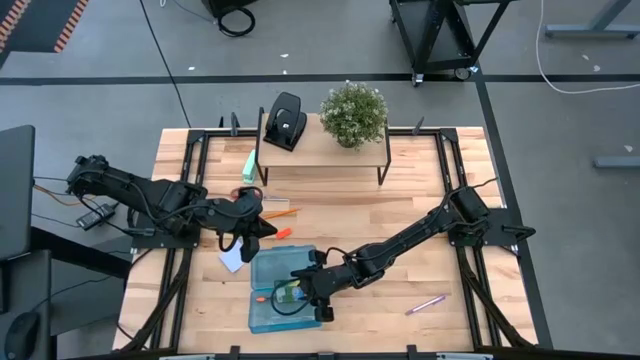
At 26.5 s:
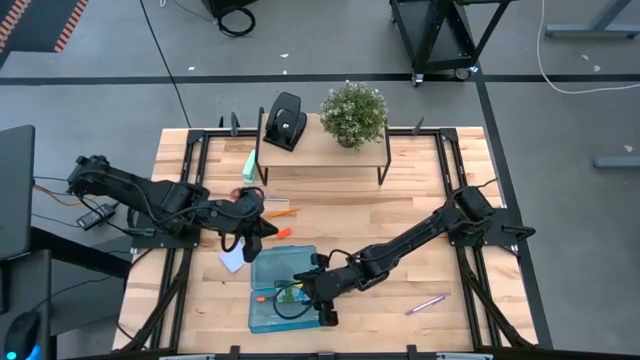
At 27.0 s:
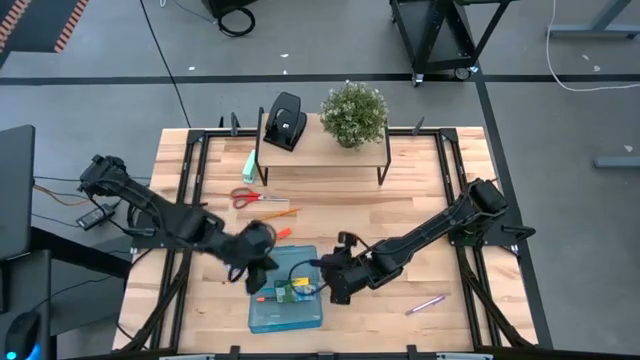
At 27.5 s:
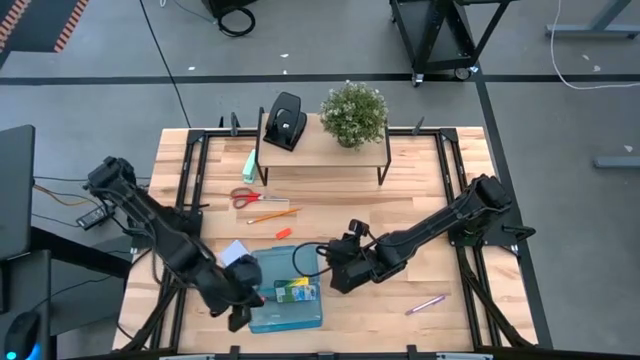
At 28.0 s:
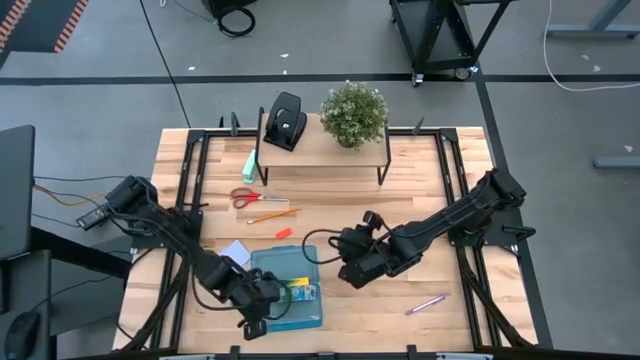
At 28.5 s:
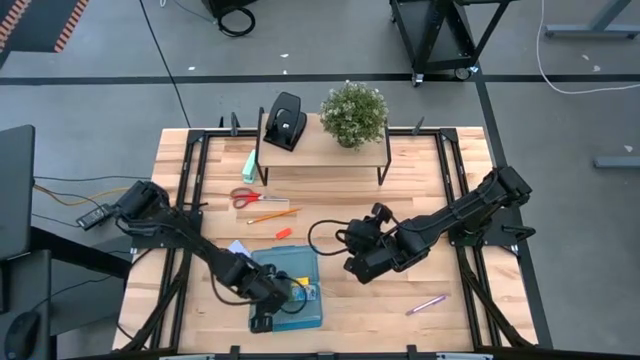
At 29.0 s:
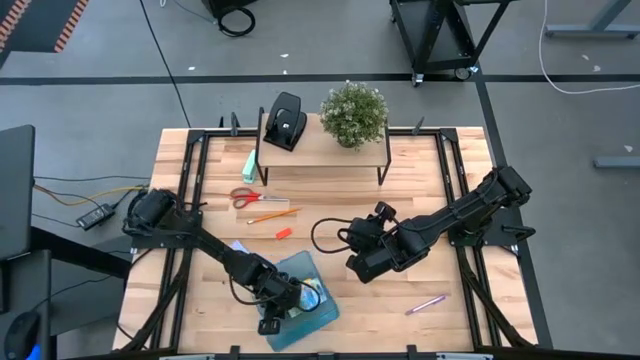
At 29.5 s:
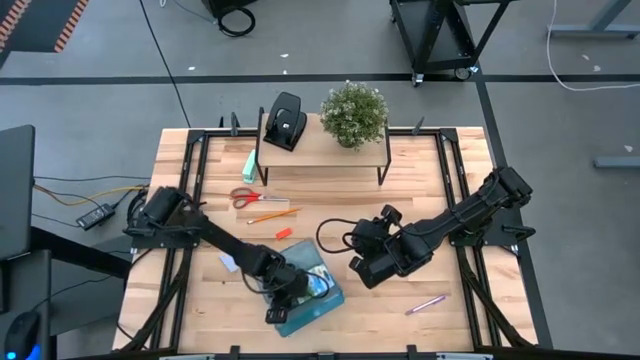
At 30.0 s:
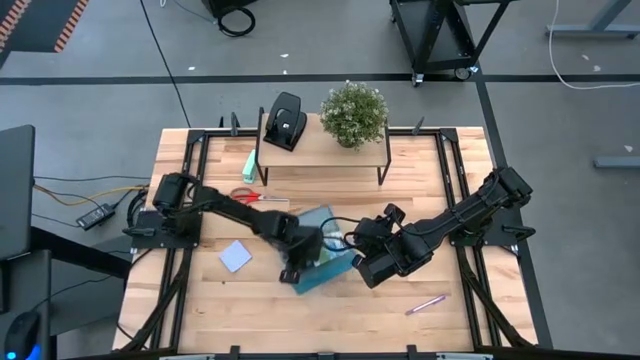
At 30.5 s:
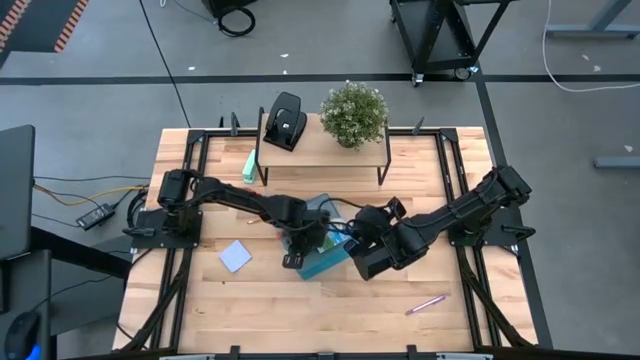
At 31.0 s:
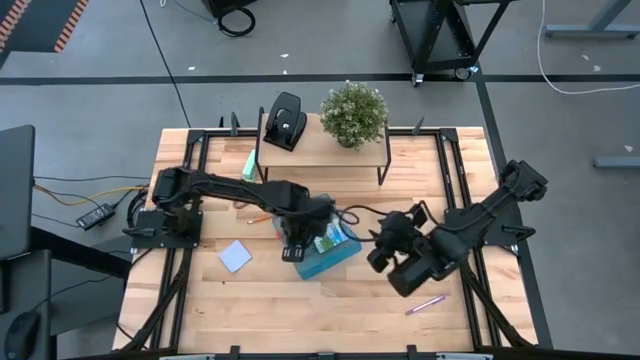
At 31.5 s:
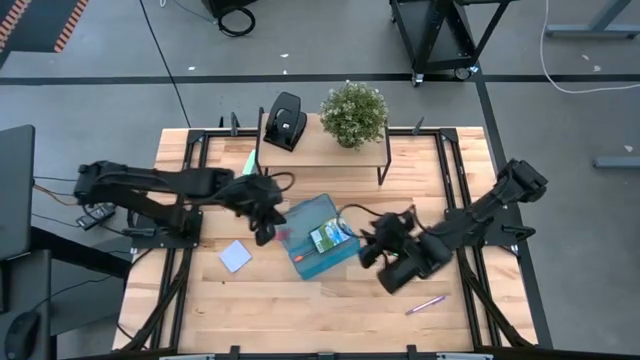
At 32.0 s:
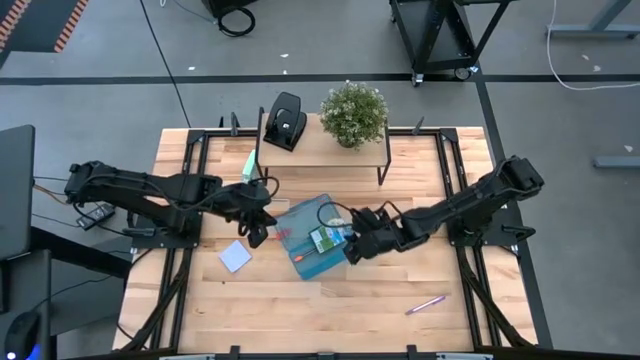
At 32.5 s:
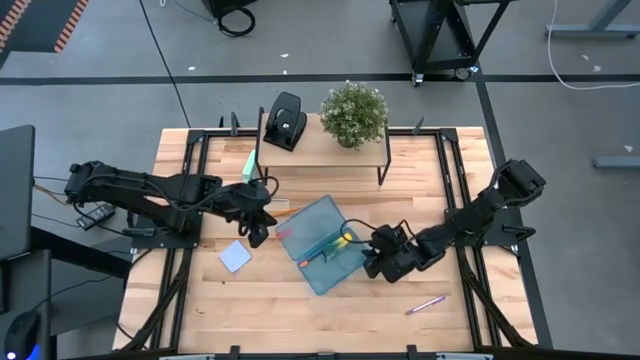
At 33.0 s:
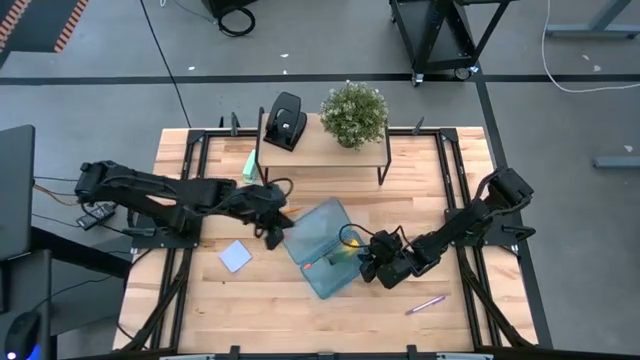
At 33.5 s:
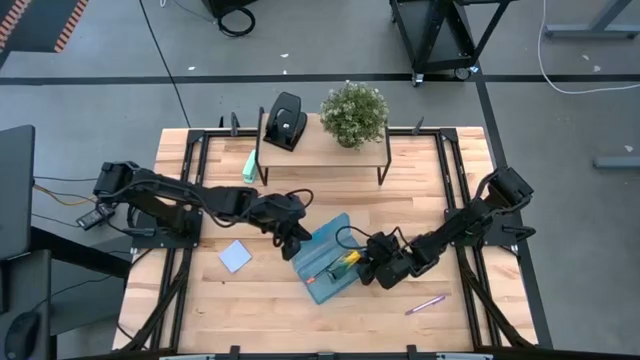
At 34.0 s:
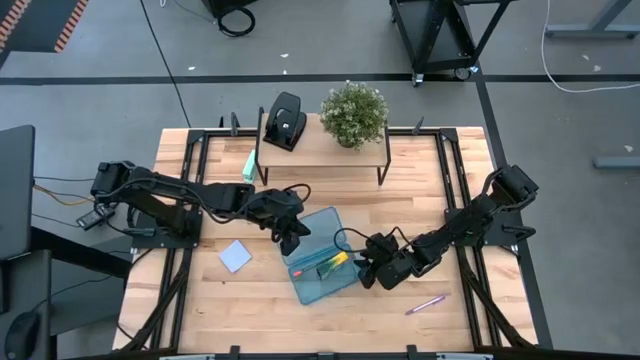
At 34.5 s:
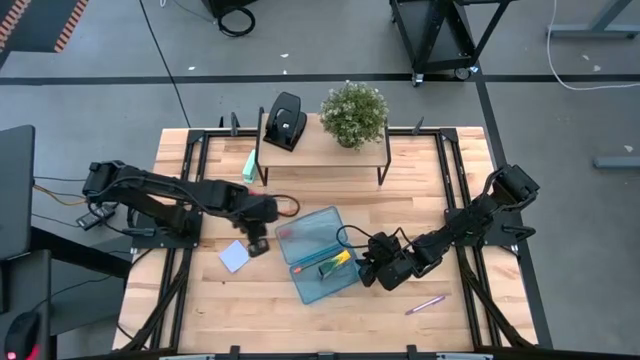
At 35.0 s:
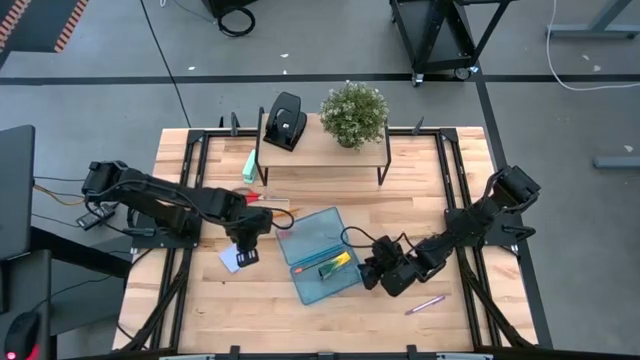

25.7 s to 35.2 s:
Task: Pack school essentials
Move the blue supply box to the center of the table

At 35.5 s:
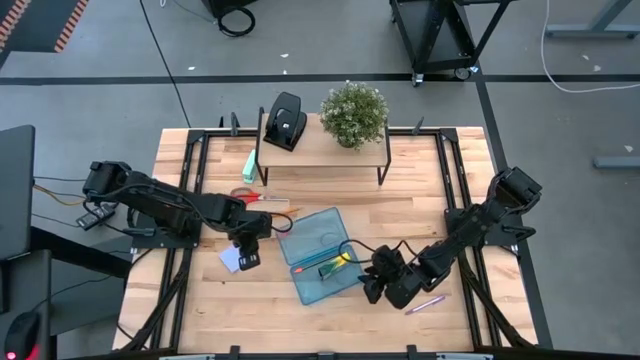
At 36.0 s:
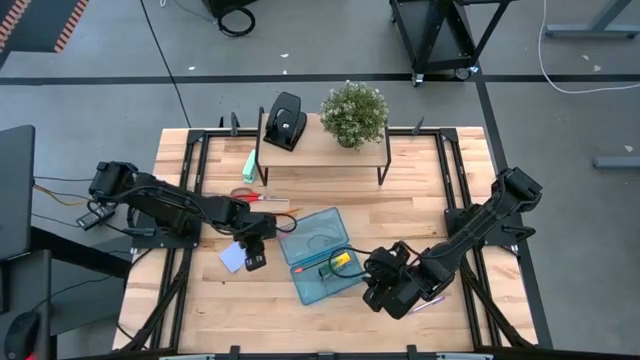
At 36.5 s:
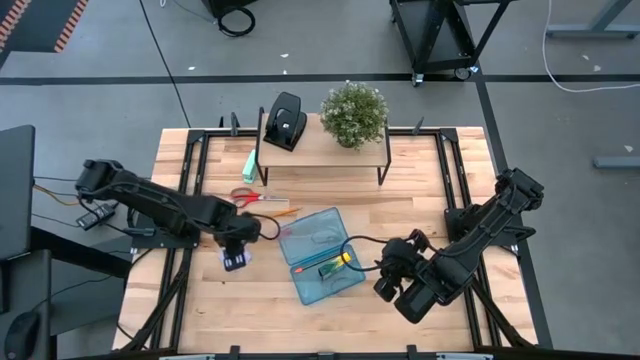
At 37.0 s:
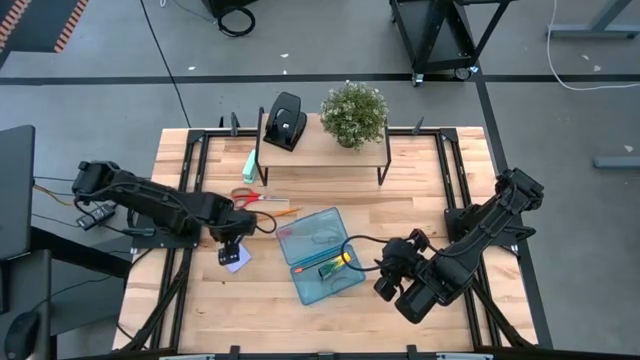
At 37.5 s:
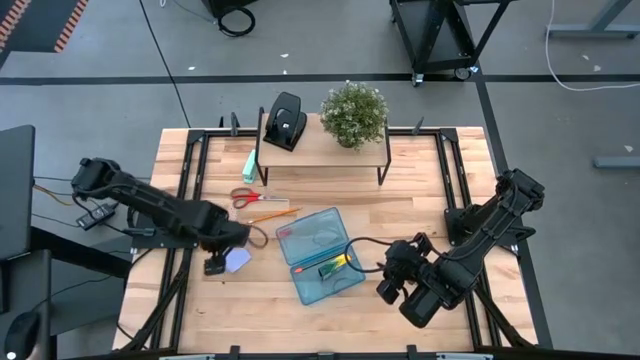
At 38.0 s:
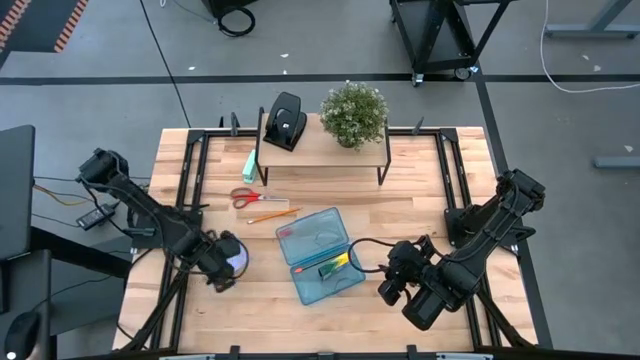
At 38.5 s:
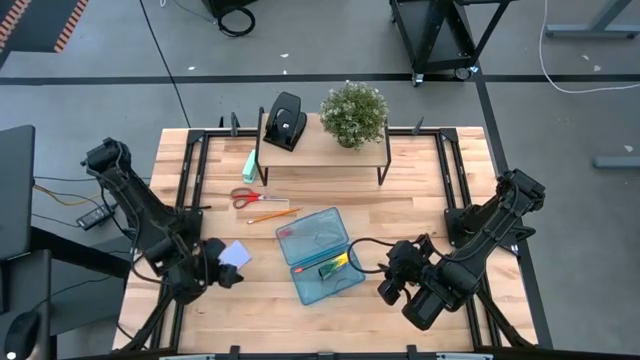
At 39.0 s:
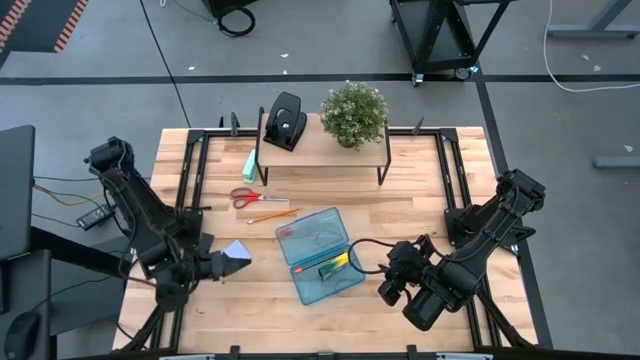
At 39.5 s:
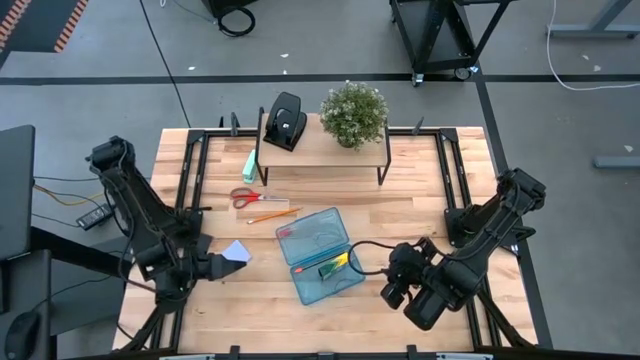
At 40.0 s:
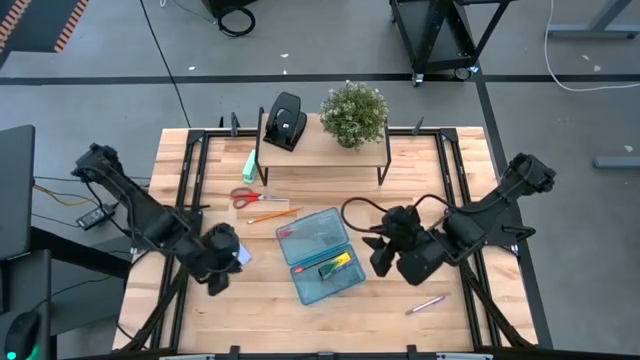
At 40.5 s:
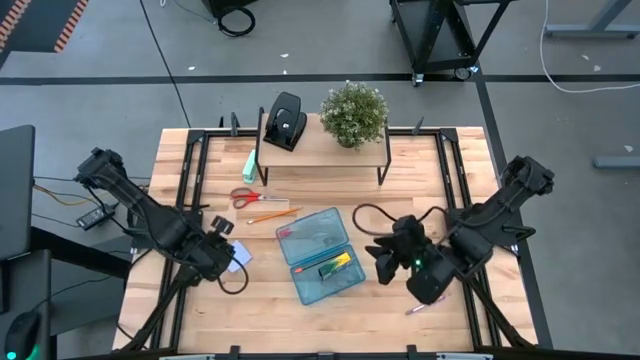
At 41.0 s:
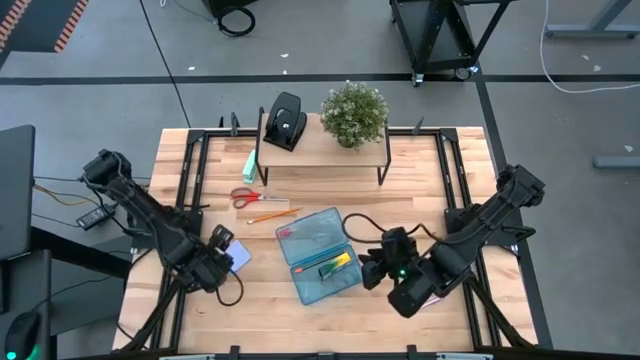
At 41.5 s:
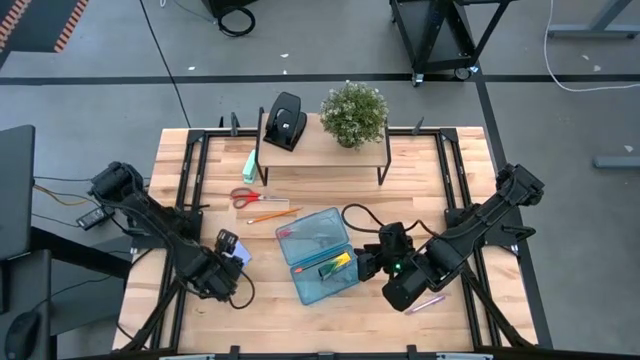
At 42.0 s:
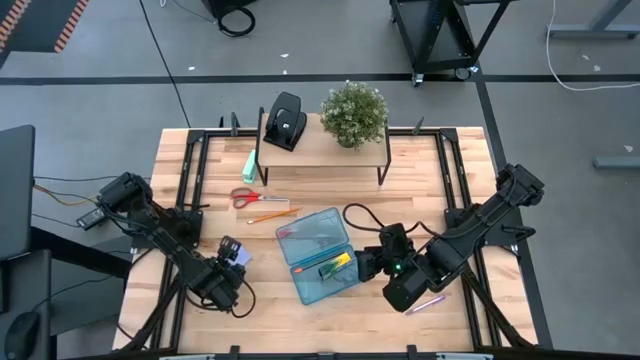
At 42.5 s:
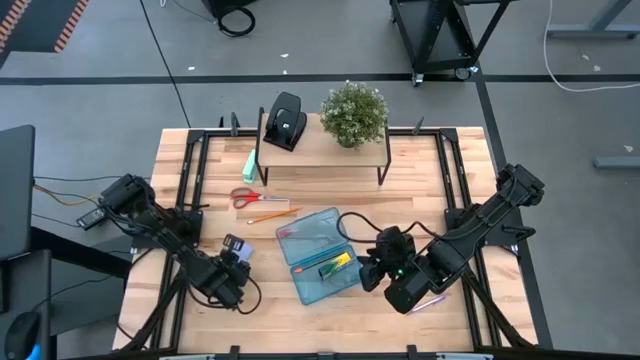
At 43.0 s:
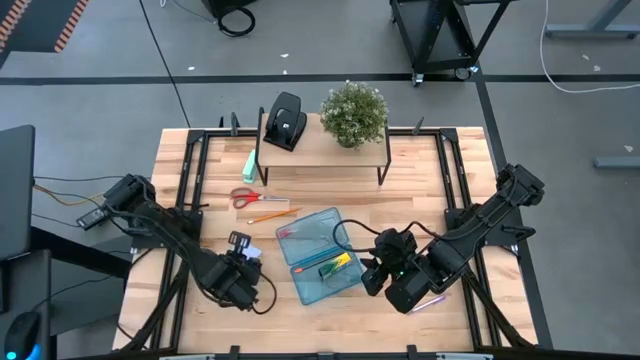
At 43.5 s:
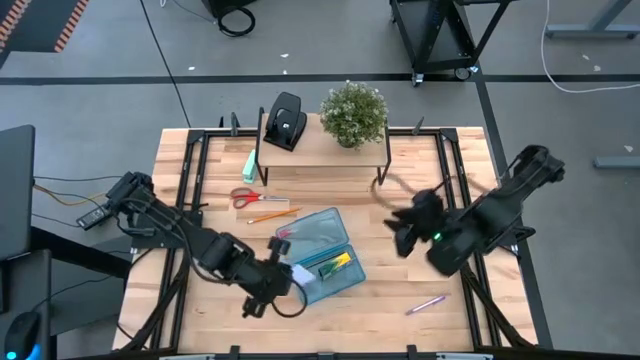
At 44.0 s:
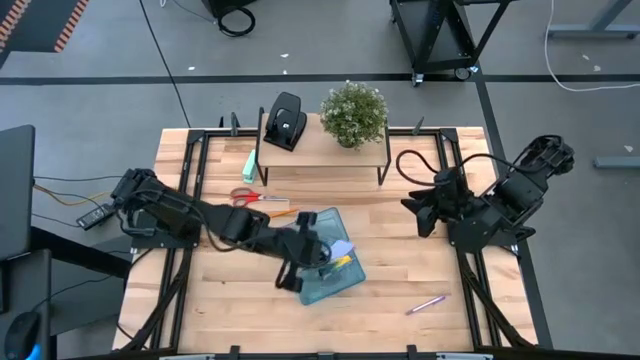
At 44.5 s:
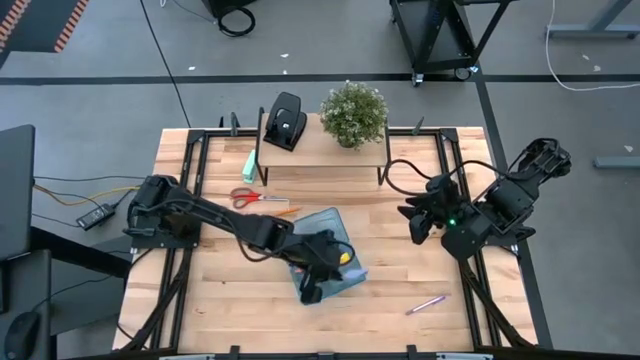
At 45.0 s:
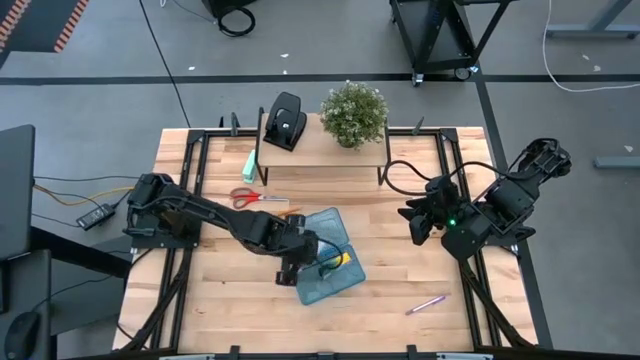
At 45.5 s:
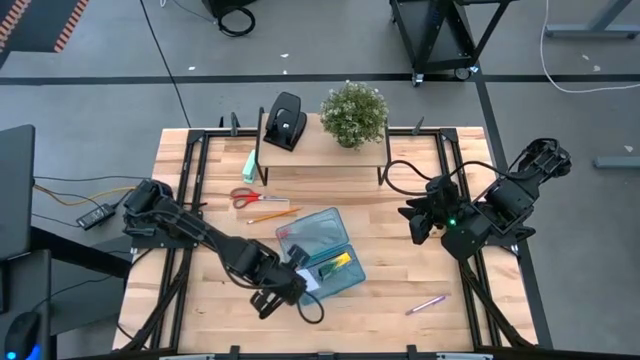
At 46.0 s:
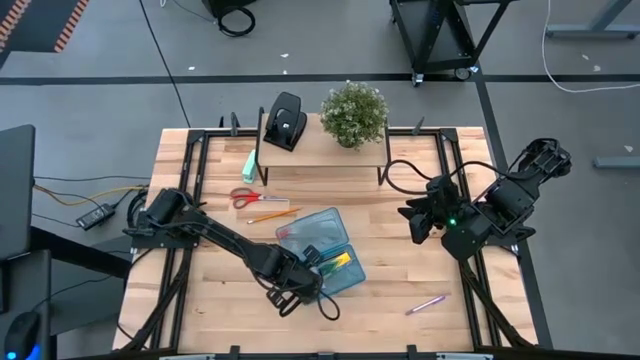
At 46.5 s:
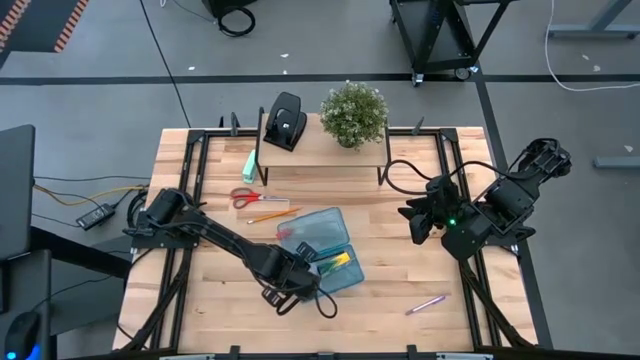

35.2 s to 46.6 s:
Put the purple sticky notes into the blue supply box

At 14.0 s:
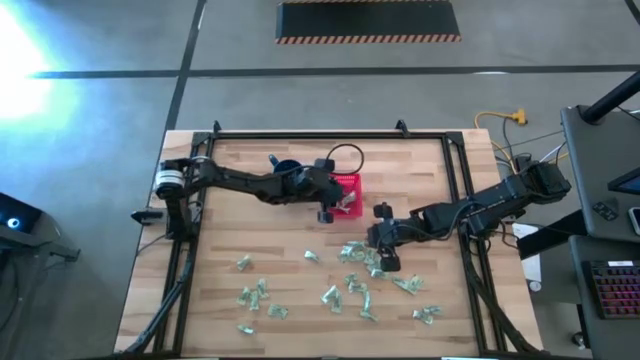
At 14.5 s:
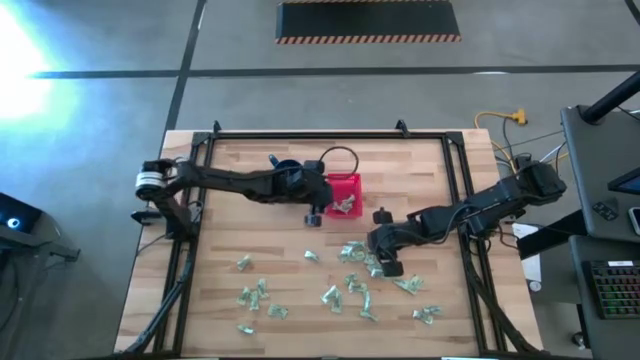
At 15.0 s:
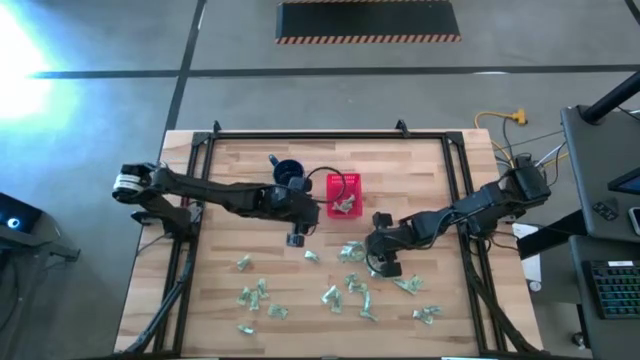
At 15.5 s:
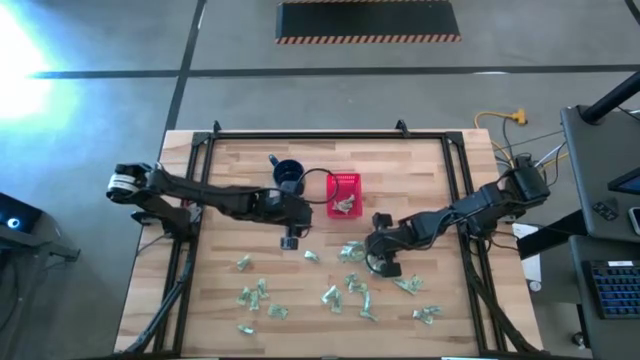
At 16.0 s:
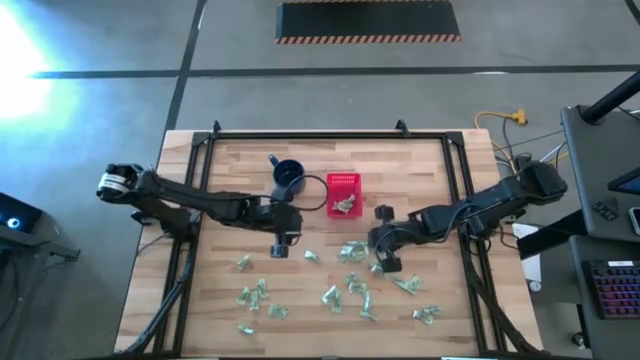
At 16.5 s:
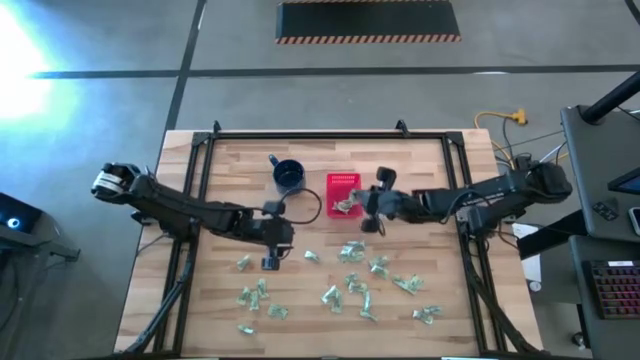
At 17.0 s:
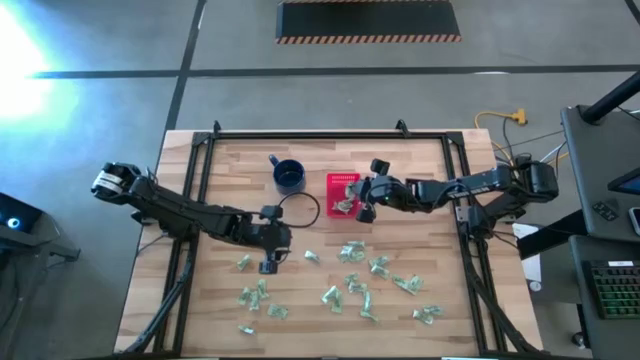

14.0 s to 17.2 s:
Task: Pick and place items into bin
Put the green stevia packet into the red bin
